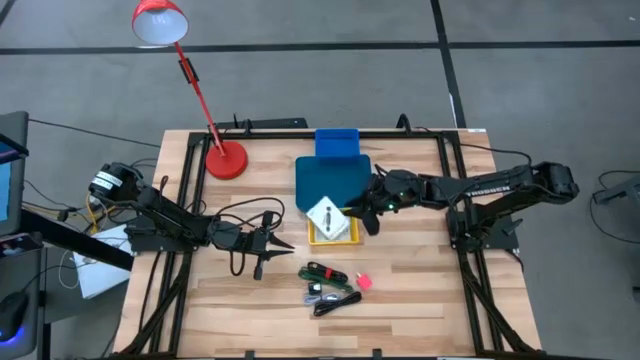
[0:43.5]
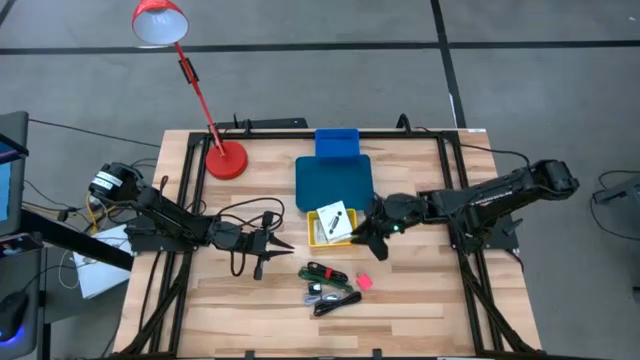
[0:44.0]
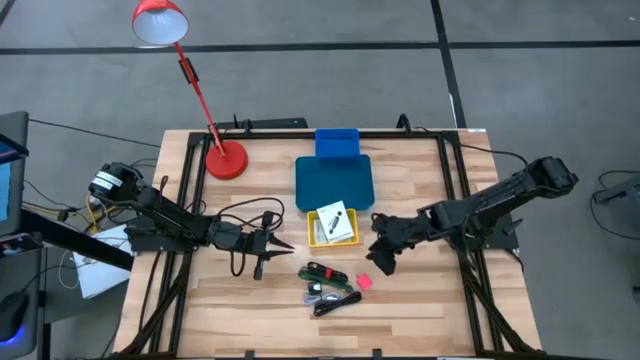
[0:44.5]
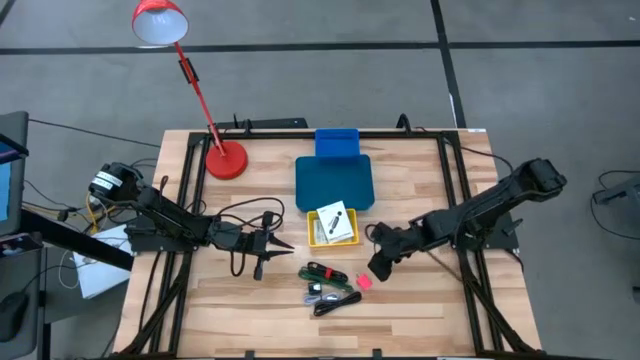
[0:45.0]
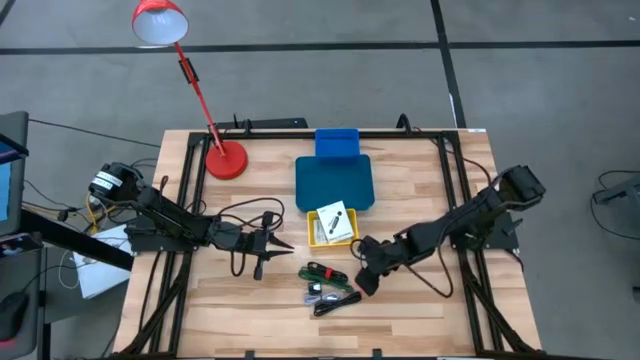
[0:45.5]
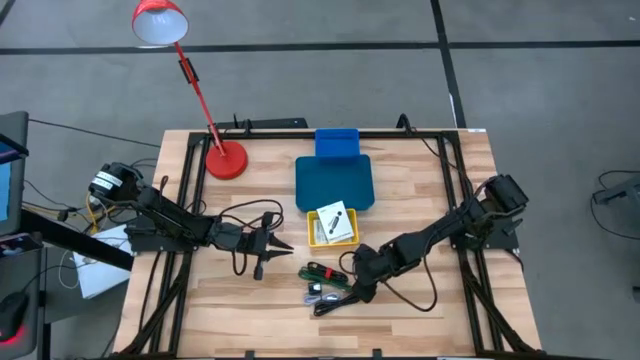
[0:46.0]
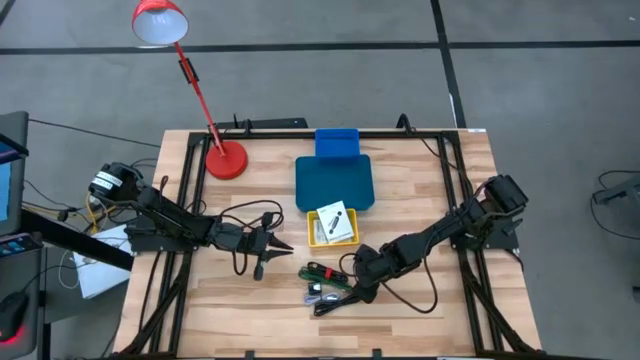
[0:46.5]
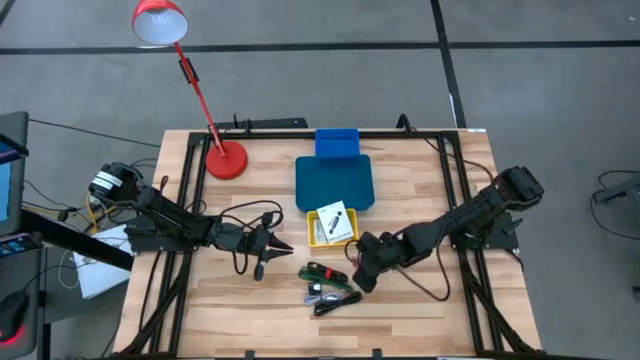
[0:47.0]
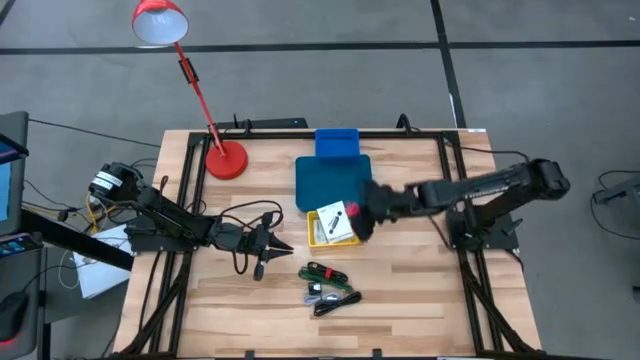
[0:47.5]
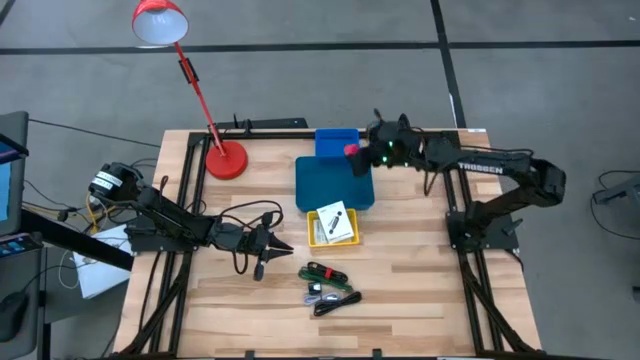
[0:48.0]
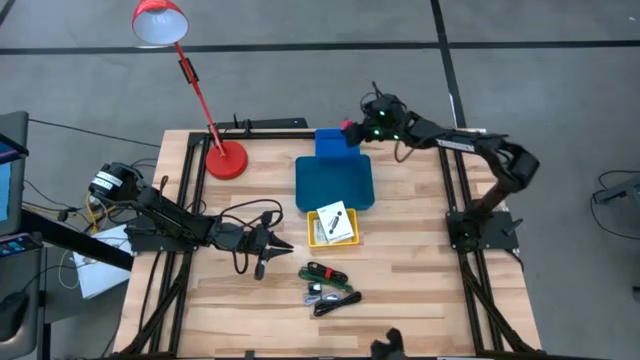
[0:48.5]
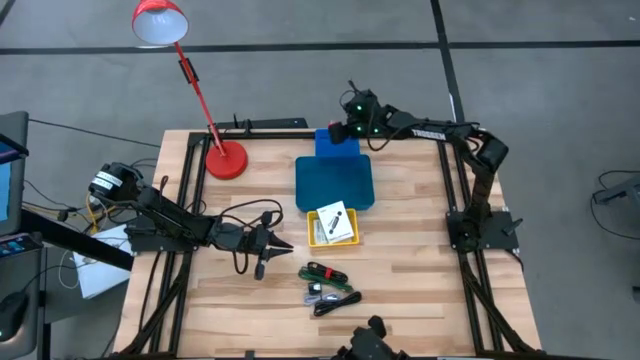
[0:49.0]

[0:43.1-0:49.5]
Task: Pick and place items into bin
Put the pink charger adapter into the top blue basket

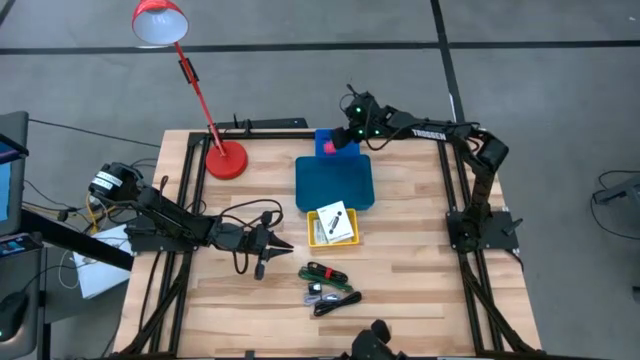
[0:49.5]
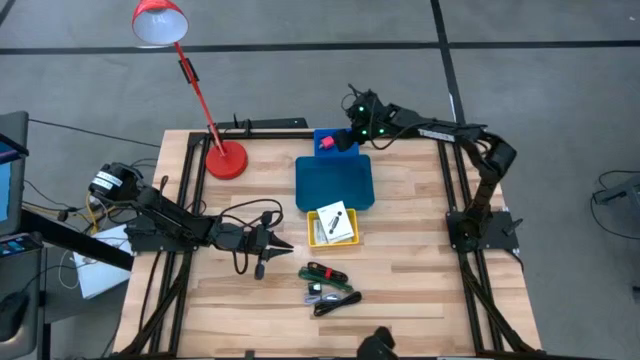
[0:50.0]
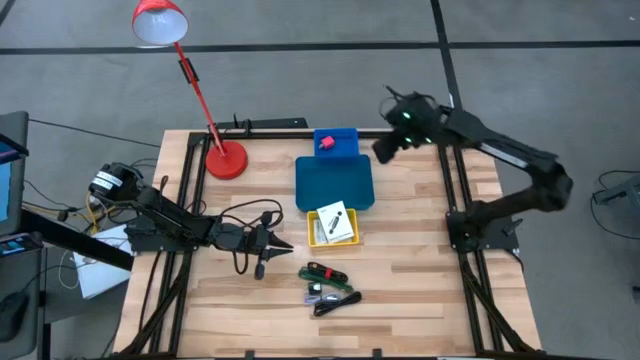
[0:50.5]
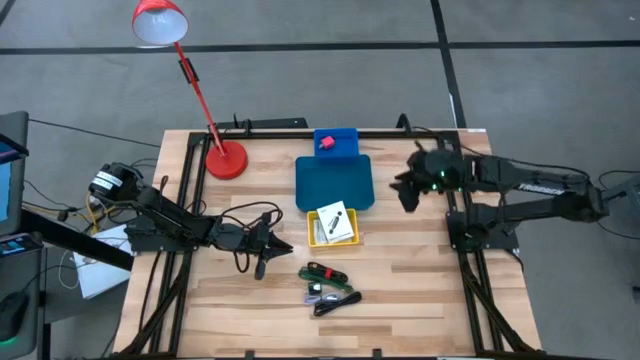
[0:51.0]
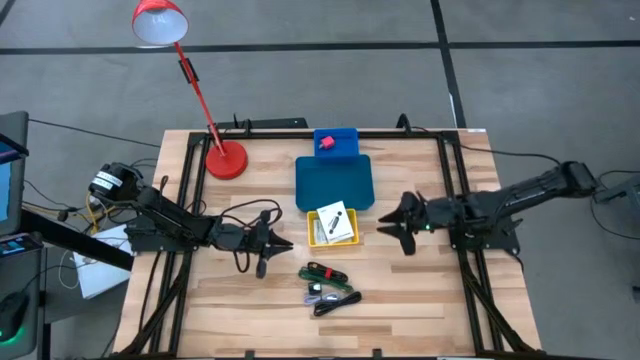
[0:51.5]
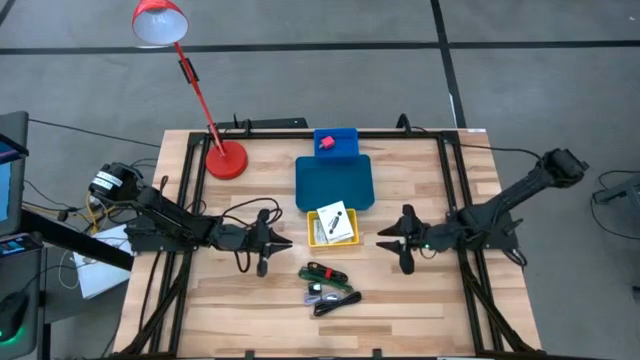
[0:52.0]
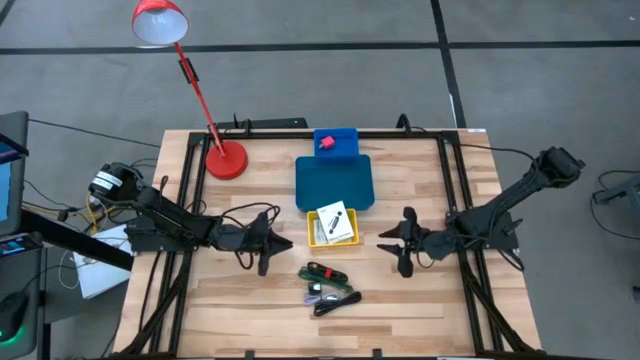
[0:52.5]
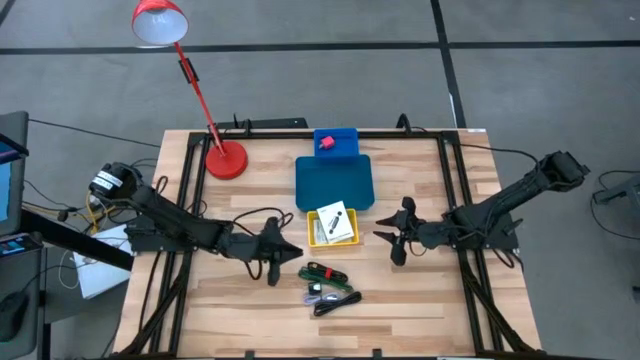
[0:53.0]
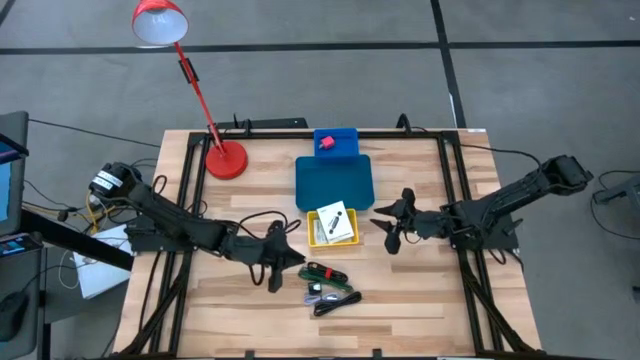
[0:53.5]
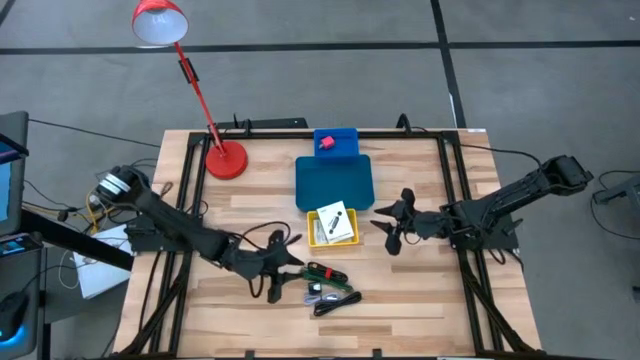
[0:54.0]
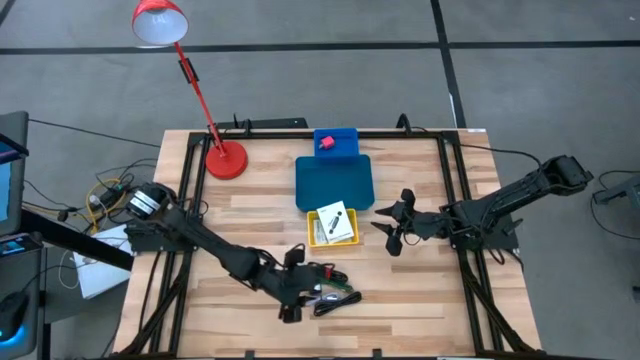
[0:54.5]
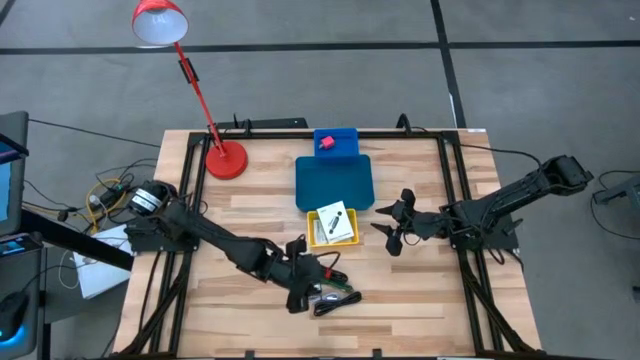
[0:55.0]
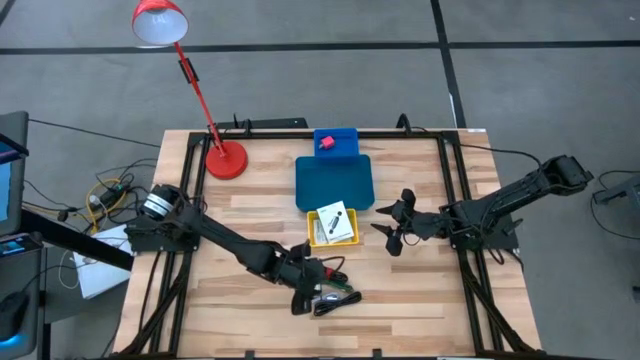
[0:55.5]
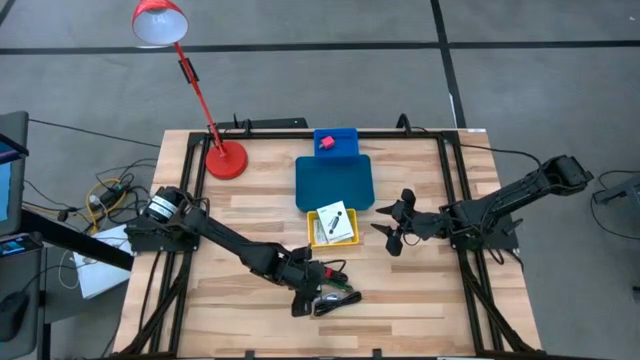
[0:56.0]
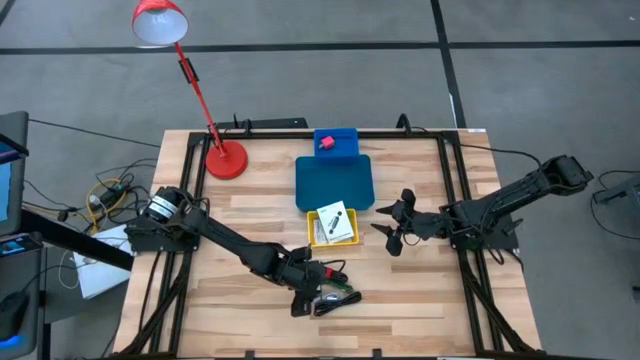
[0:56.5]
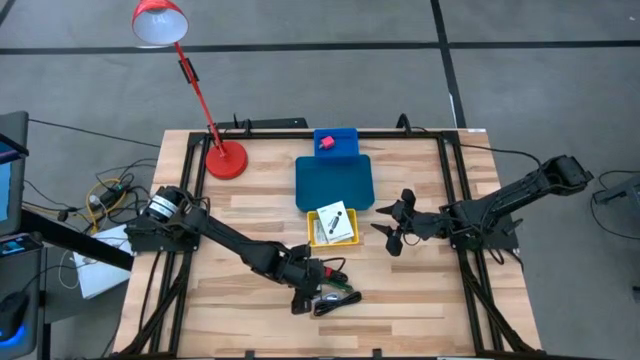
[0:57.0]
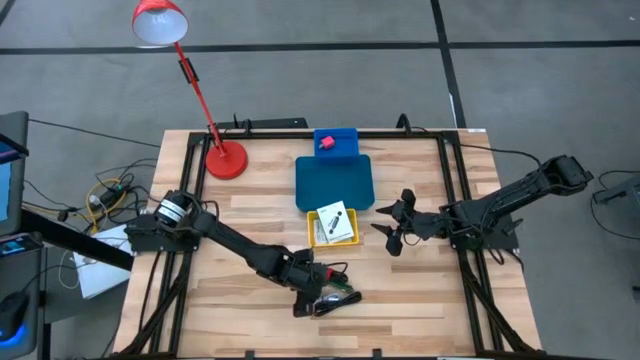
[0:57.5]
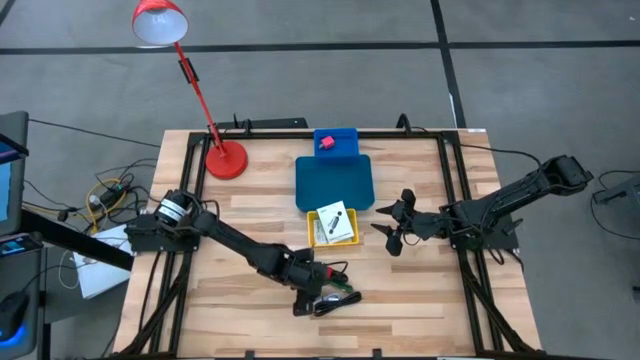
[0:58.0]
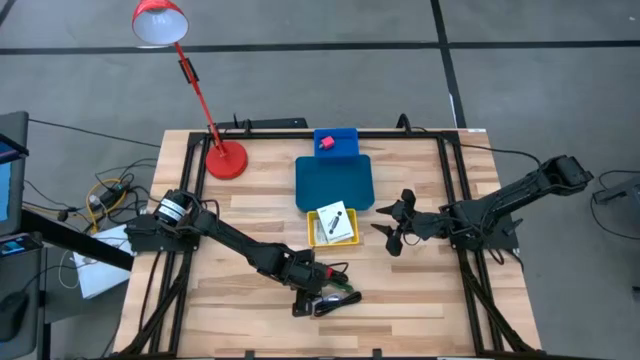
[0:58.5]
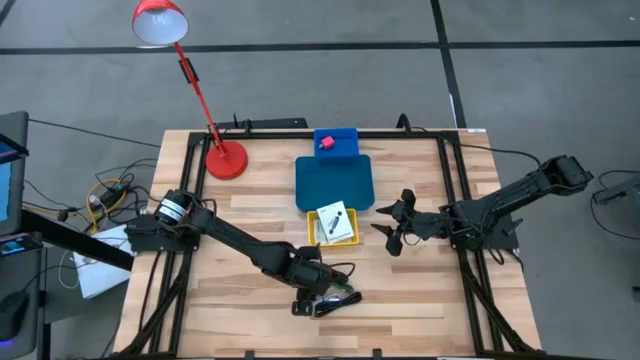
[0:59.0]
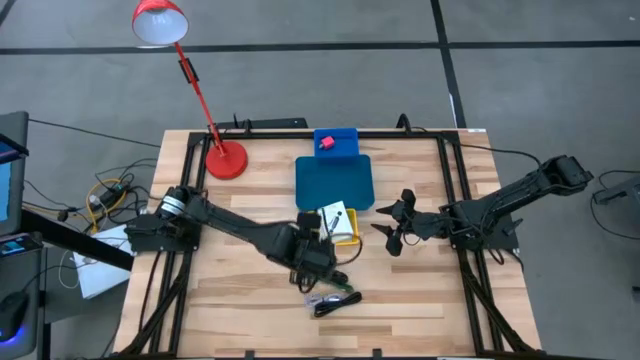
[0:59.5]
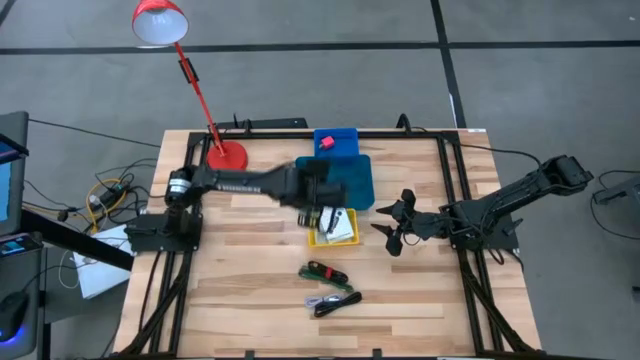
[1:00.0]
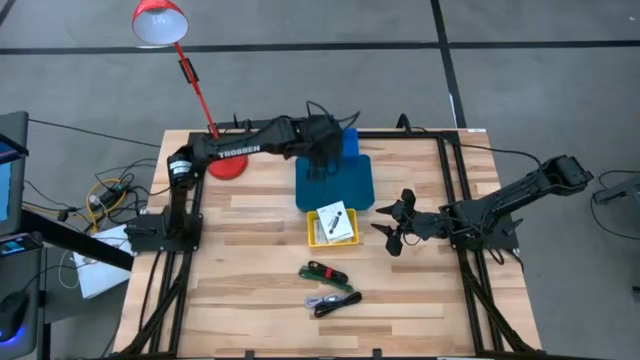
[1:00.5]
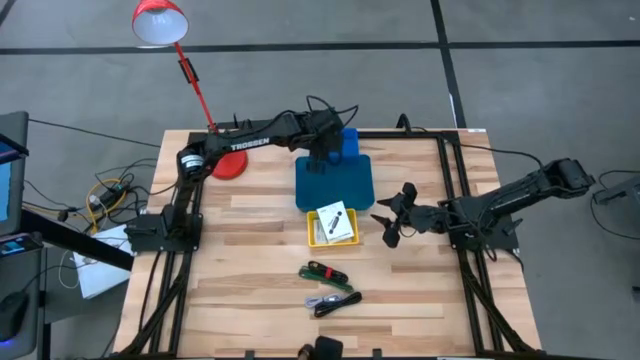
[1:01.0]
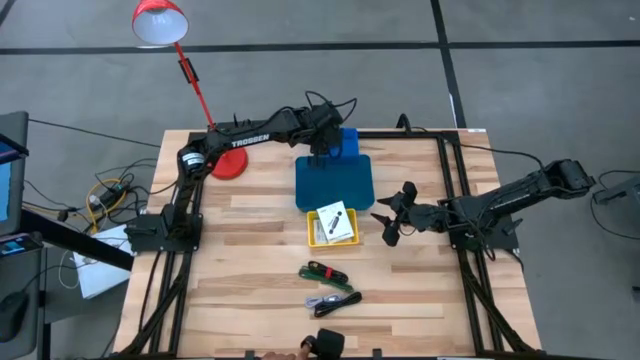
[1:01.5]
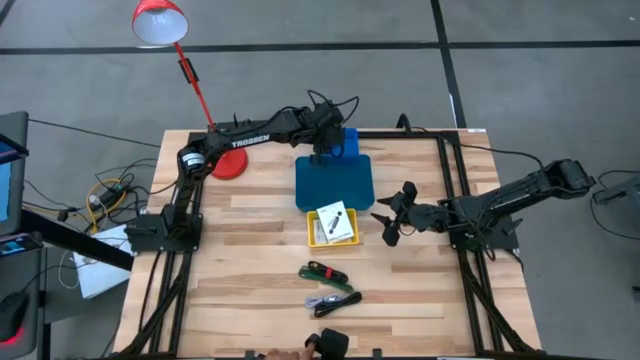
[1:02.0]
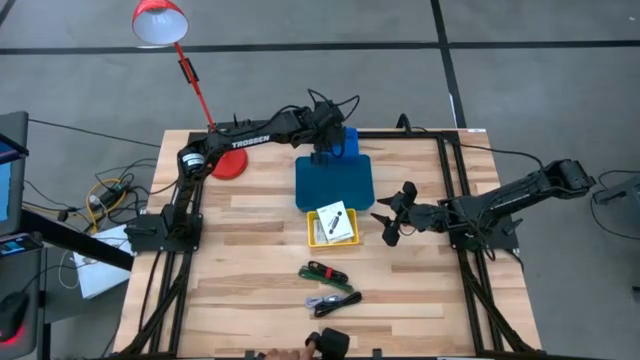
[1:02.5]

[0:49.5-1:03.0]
Put the black charger adapter into the top blue basket

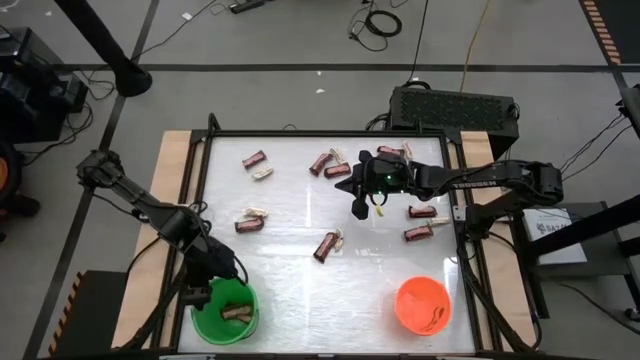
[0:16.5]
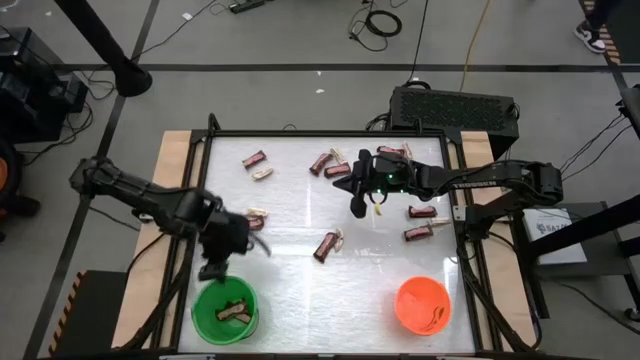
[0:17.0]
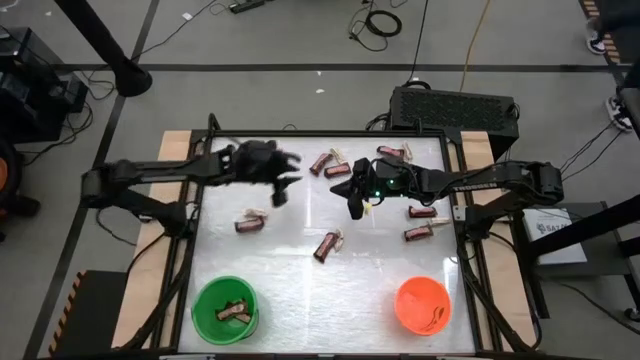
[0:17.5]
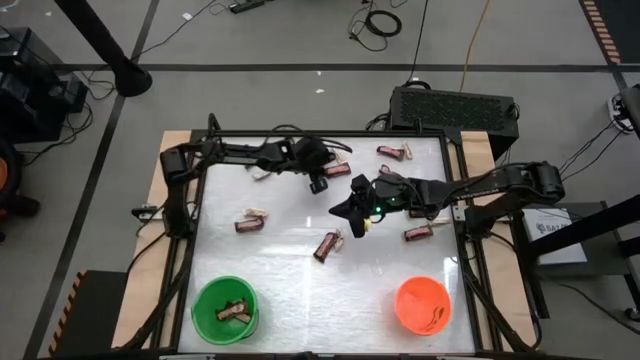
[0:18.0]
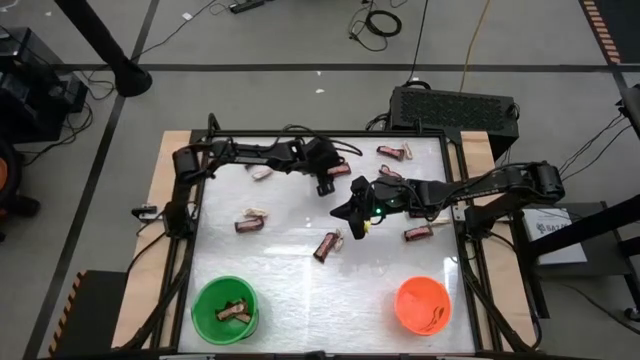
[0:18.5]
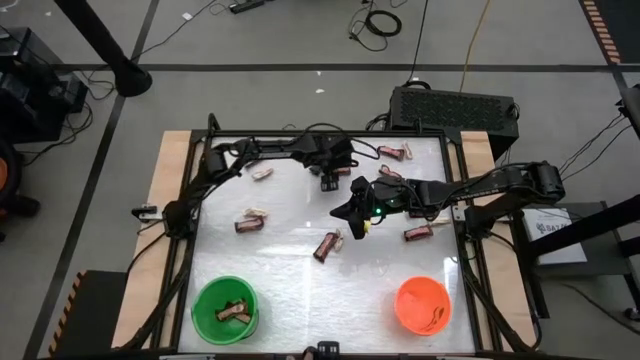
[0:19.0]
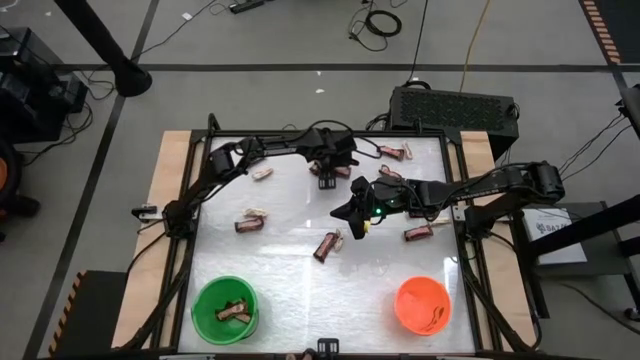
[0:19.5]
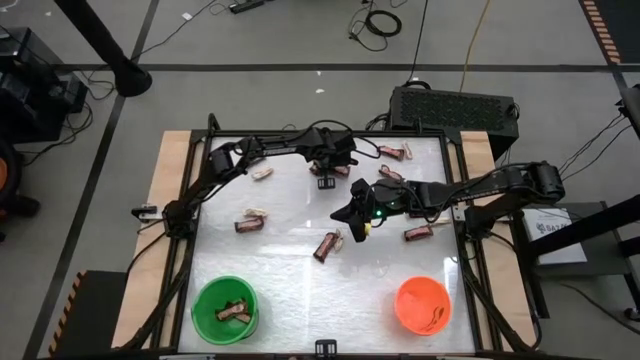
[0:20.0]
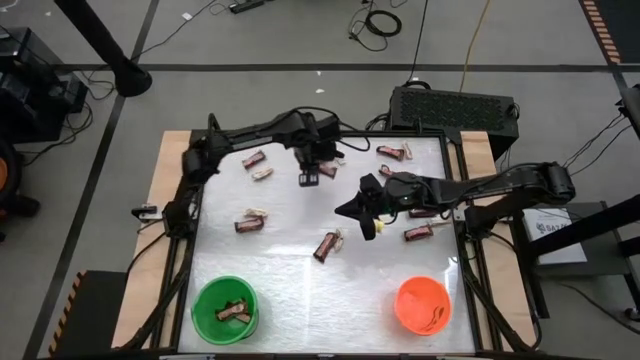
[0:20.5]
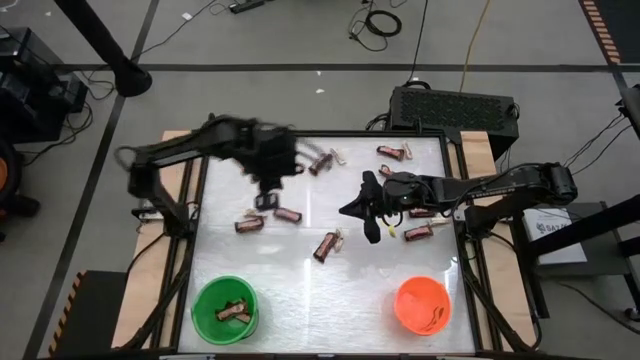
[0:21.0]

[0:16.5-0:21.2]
Task: Sort candy by brand, put in halloween buckets
Put the brown chocolate bar into the green bucket
